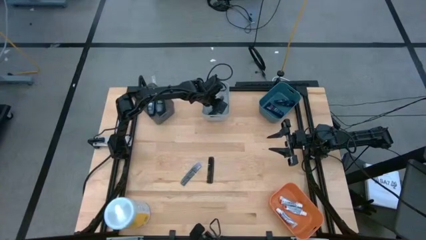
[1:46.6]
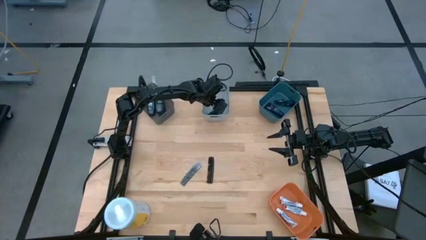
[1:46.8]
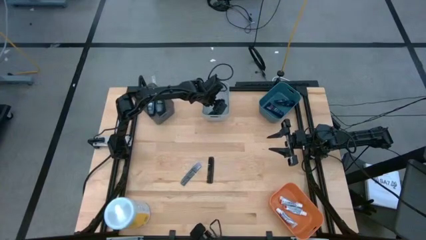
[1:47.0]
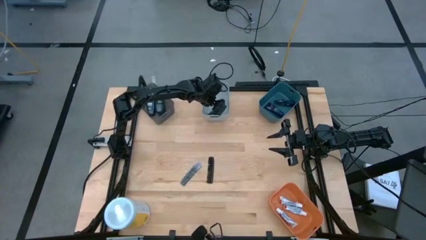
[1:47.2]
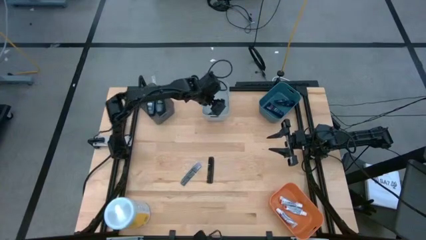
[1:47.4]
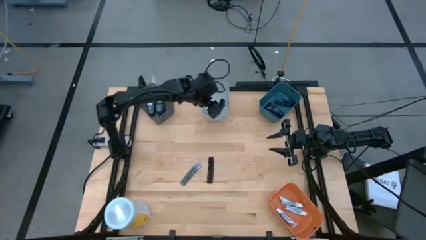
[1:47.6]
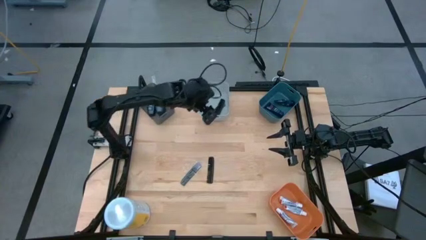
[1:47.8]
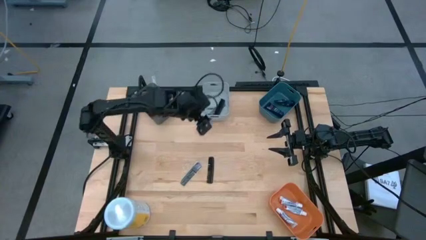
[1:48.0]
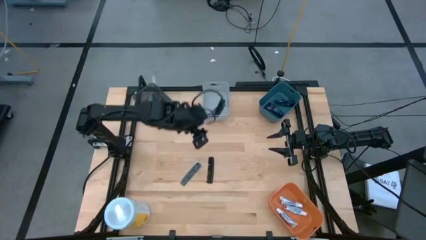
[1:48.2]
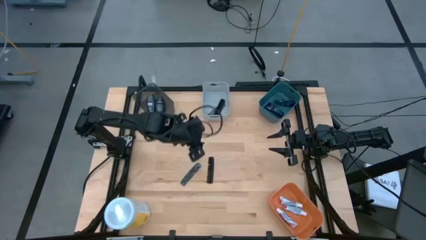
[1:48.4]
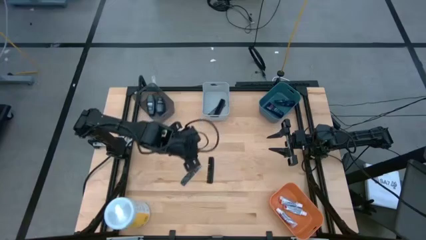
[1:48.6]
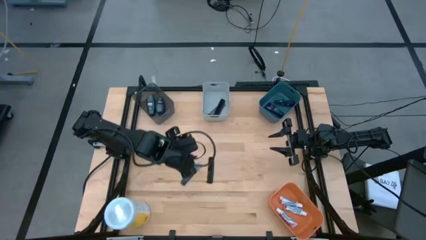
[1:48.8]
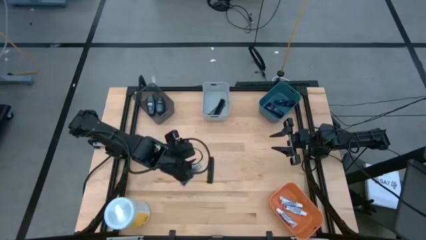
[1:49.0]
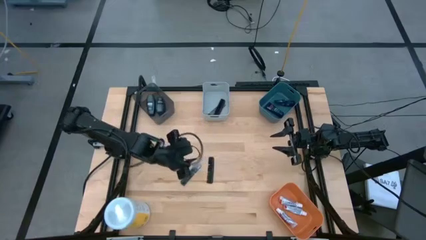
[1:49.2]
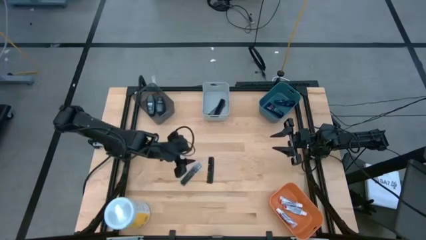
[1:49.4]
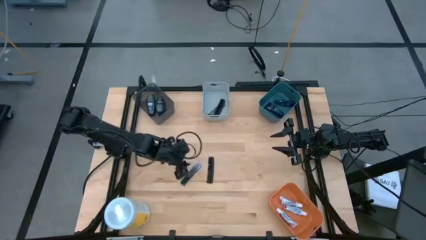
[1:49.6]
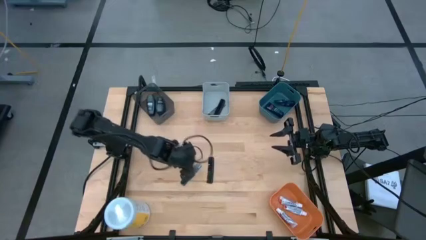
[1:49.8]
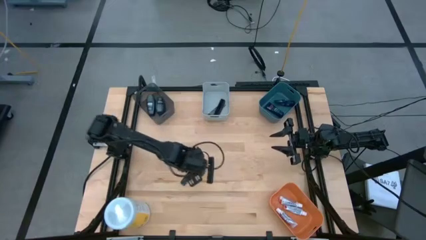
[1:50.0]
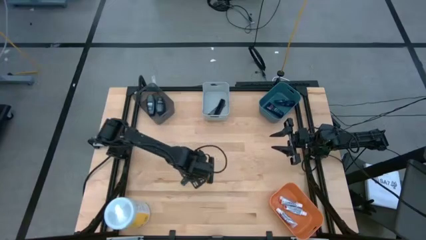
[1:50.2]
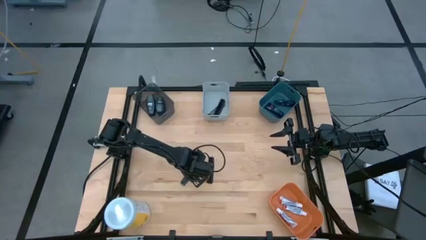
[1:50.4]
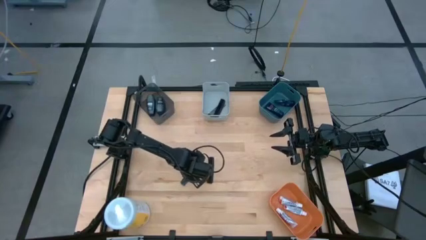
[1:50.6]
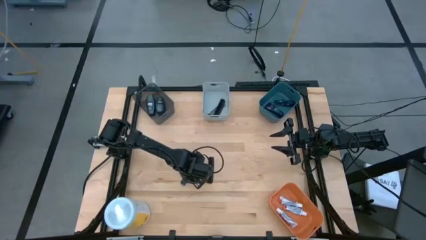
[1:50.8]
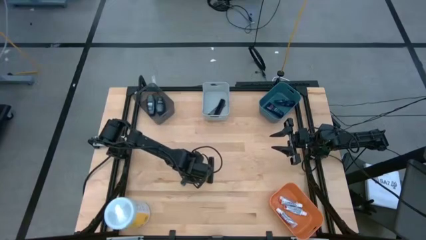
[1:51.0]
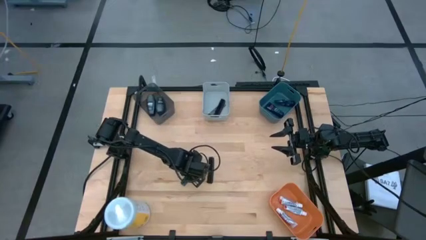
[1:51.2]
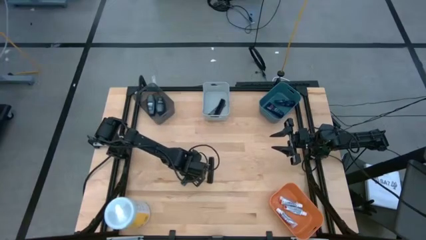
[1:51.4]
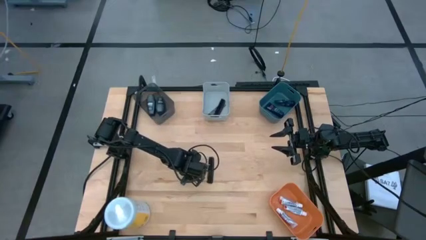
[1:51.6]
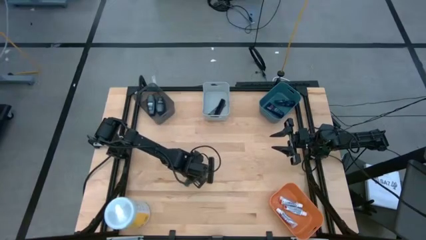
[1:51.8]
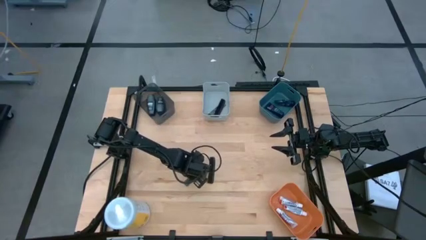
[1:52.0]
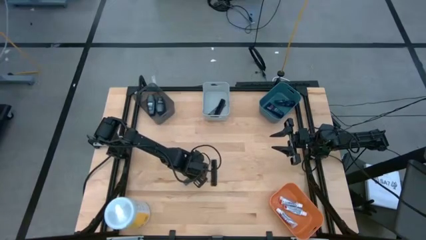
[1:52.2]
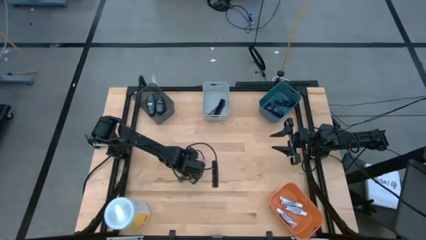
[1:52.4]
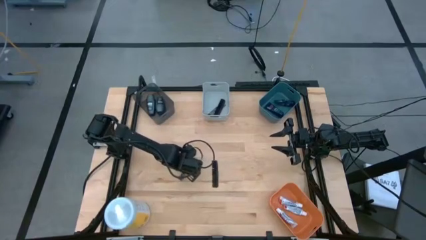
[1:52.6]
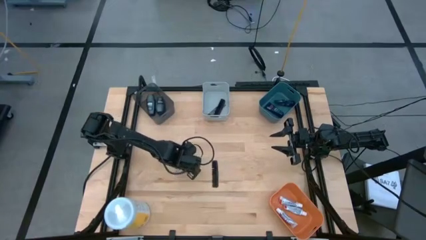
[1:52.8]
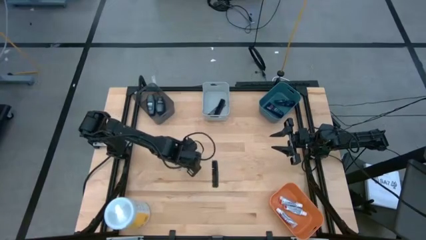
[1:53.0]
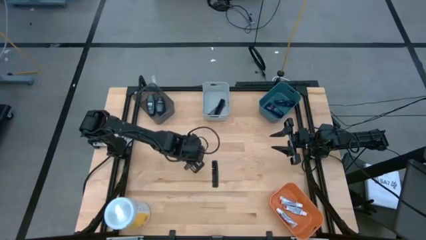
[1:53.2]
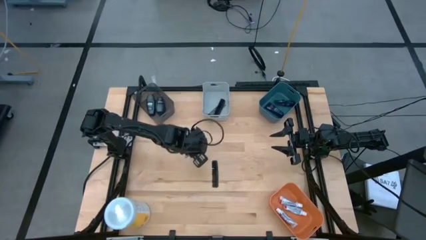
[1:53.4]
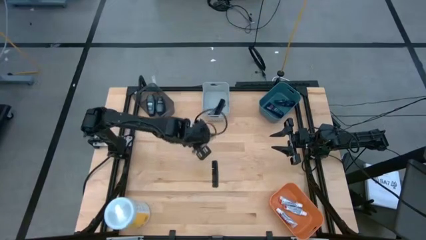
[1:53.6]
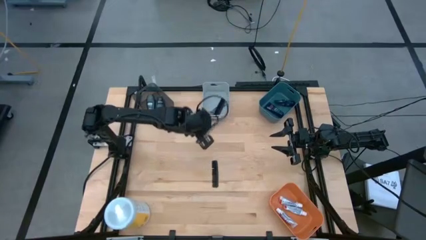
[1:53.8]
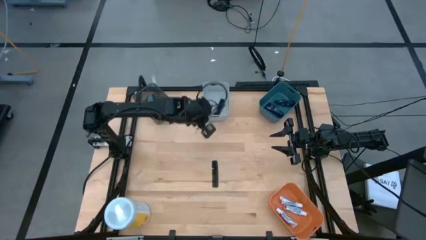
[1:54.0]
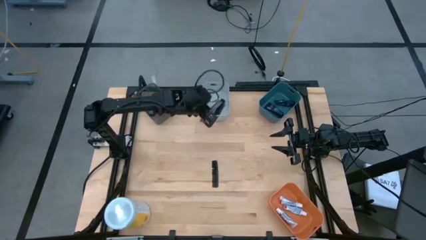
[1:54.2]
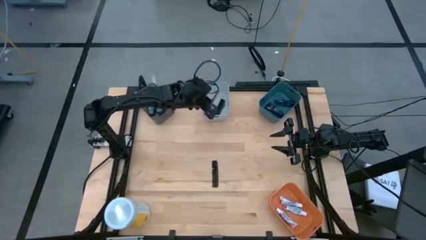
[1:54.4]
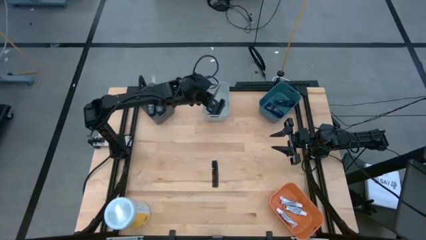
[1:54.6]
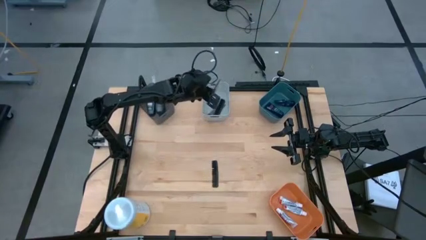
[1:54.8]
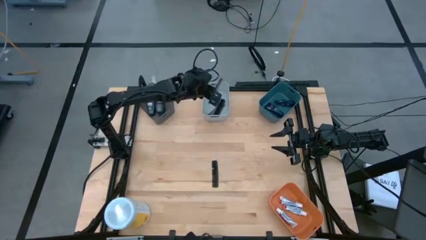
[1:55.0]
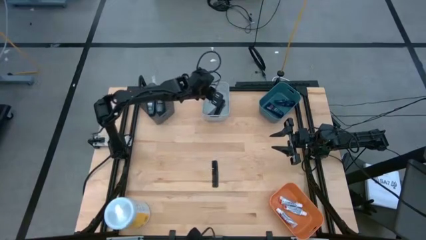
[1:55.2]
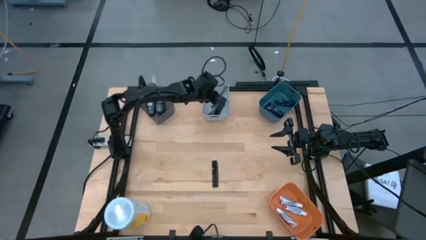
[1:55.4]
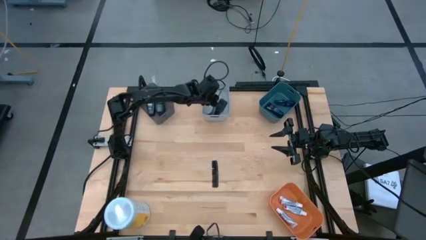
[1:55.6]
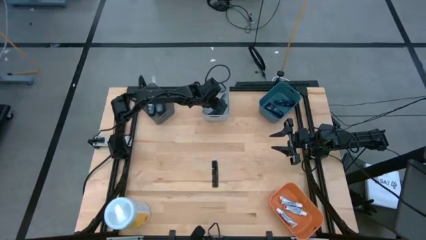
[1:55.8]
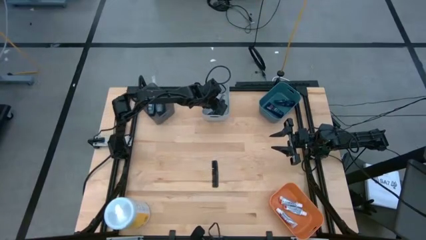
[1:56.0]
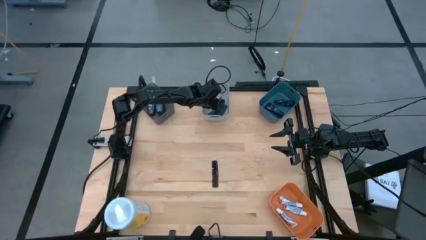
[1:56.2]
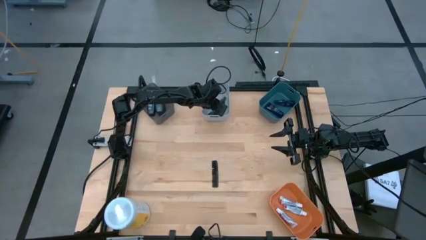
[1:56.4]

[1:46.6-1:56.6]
Task: Pick & Place Travel size toiletries
Put the black comb into the gray bin

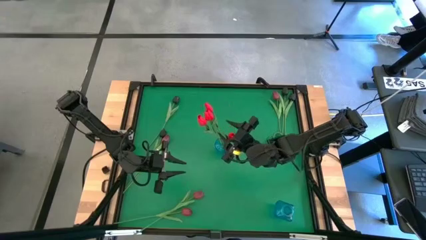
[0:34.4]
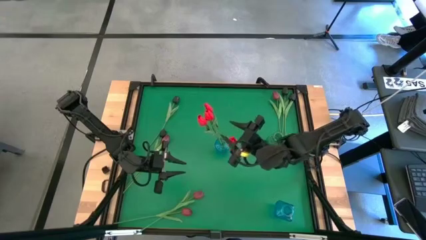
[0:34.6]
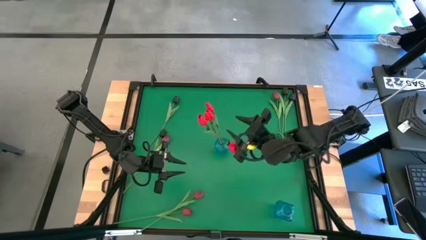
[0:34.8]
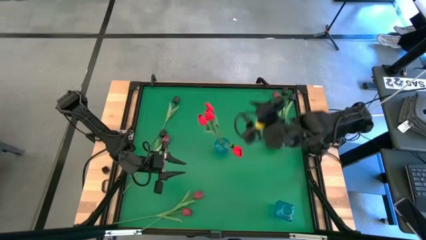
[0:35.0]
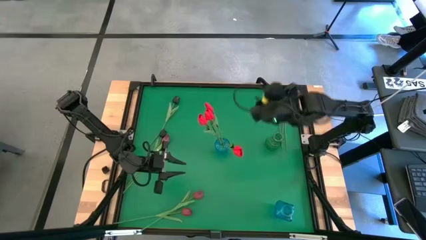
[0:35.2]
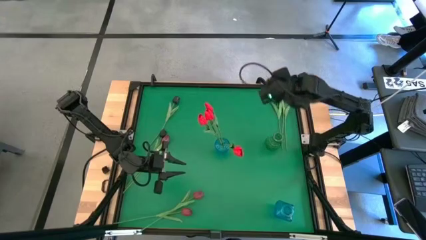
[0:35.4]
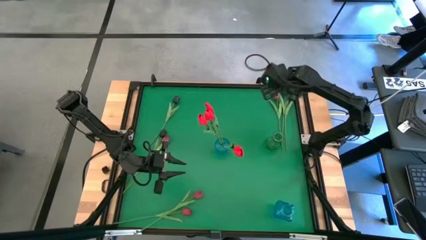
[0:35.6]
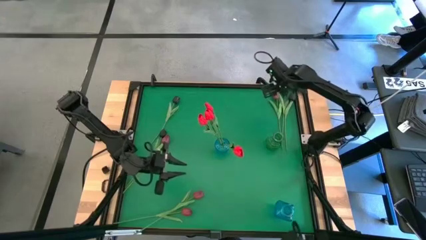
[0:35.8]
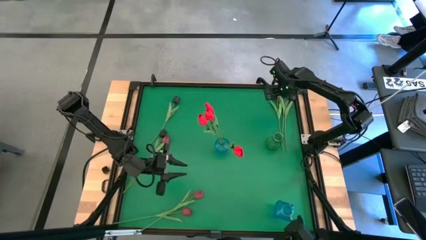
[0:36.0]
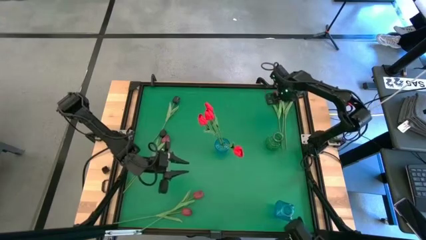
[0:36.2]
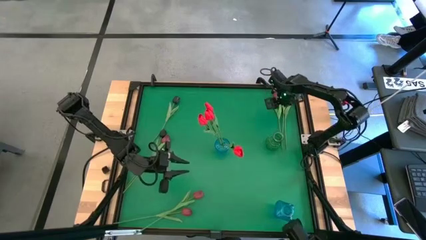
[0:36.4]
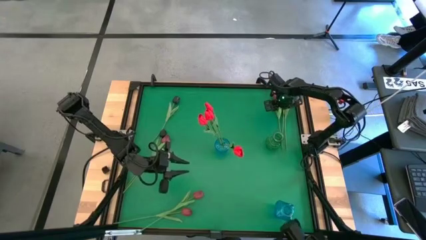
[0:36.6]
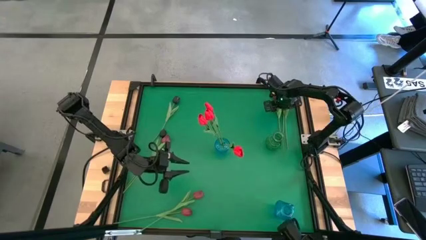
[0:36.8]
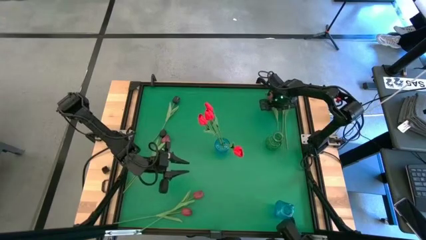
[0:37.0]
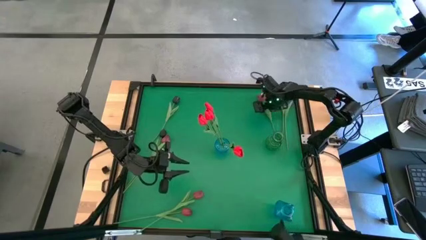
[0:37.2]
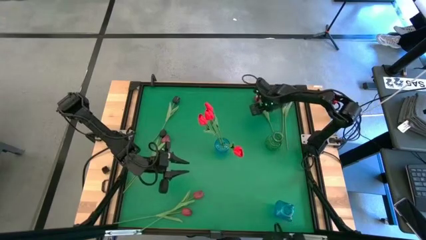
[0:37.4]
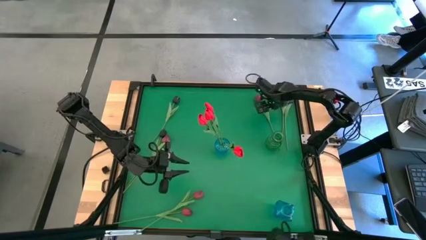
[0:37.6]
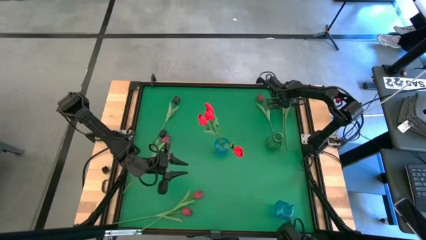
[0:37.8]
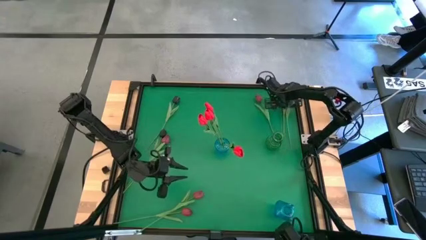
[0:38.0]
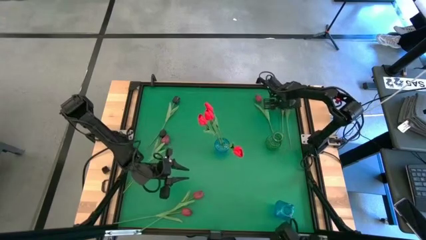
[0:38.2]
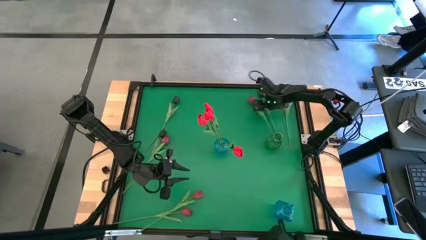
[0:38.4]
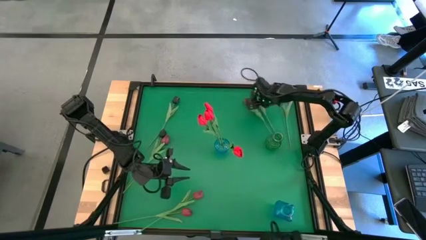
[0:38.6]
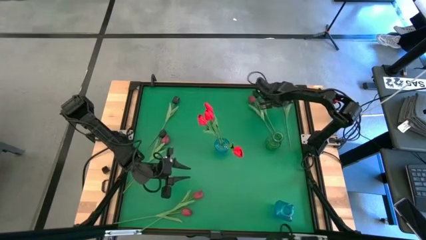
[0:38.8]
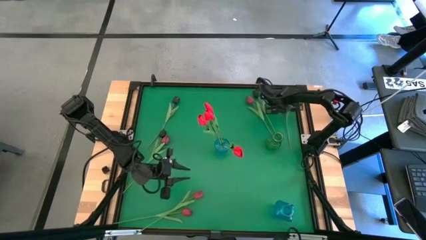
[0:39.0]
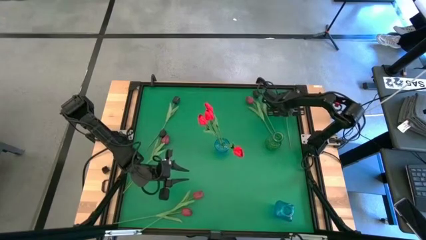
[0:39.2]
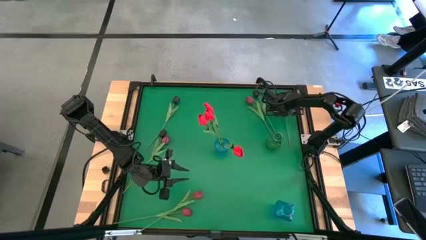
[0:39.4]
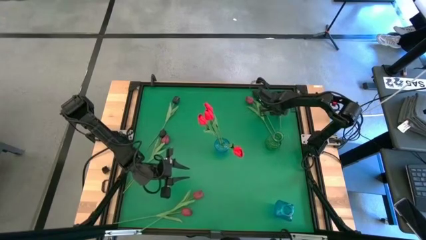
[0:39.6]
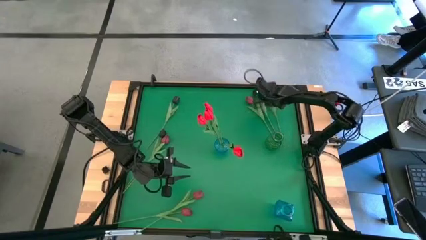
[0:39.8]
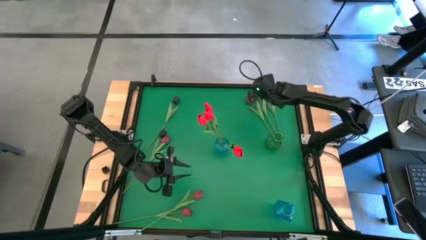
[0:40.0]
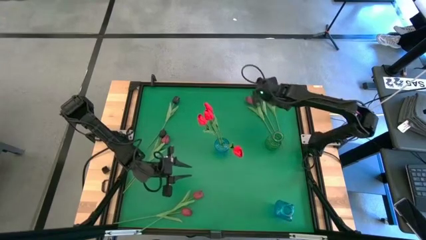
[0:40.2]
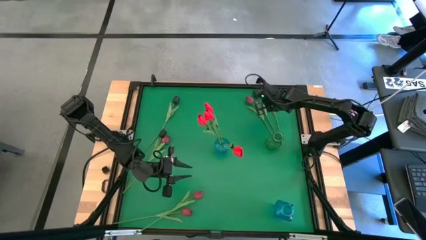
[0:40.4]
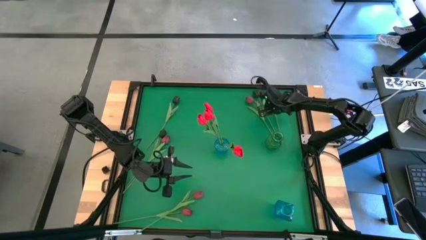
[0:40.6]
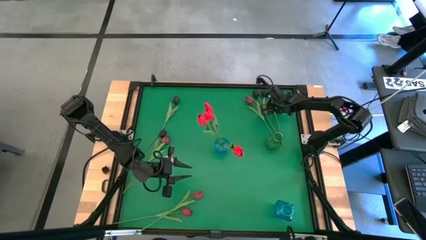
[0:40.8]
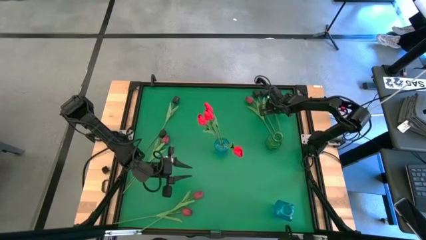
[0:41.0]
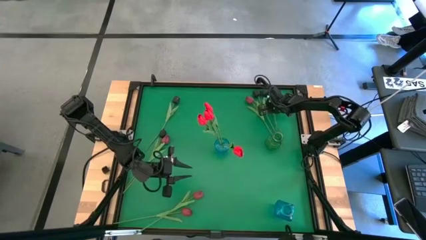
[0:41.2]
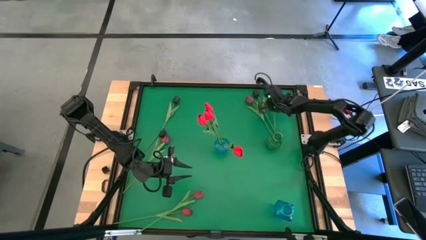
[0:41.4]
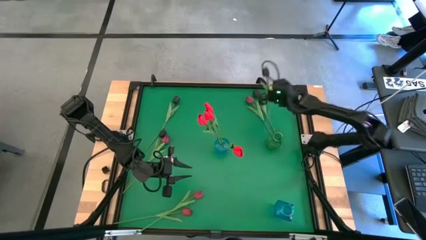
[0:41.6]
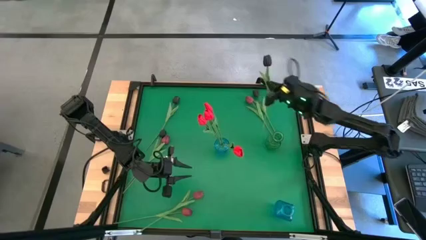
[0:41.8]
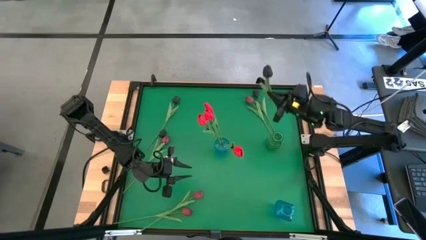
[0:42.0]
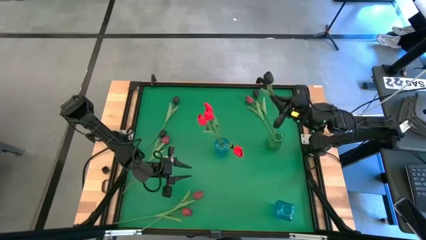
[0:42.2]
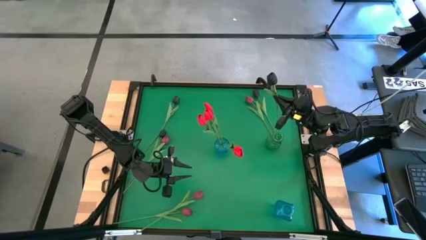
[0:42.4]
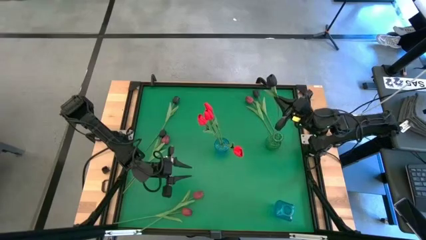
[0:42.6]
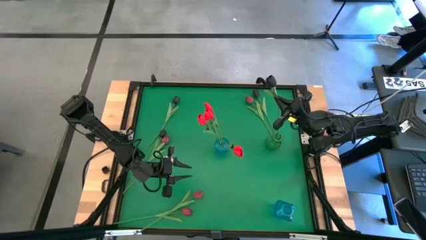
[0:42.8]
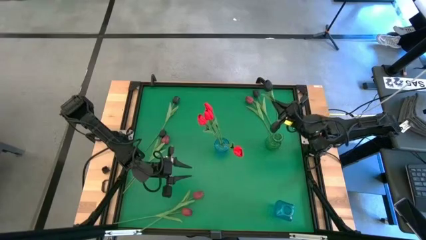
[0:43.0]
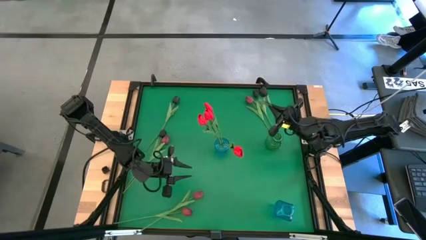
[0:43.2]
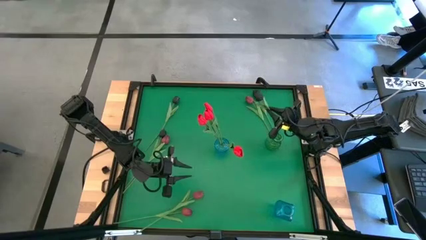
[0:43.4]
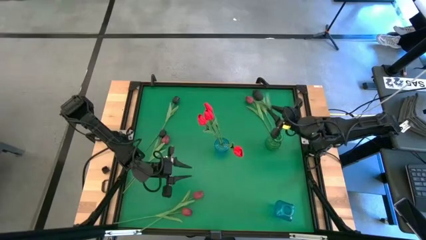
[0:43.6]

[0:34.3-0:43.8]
Task: Sort flowers into vase by color
Put the black flower in the green vase
